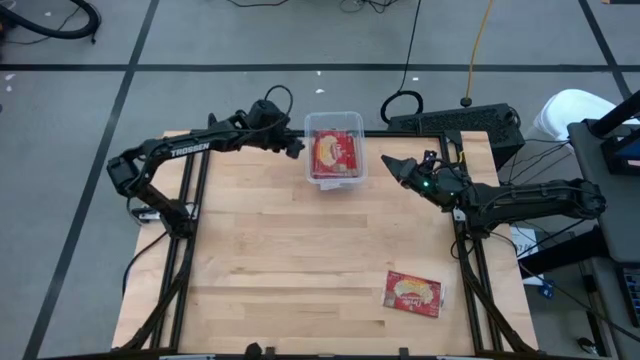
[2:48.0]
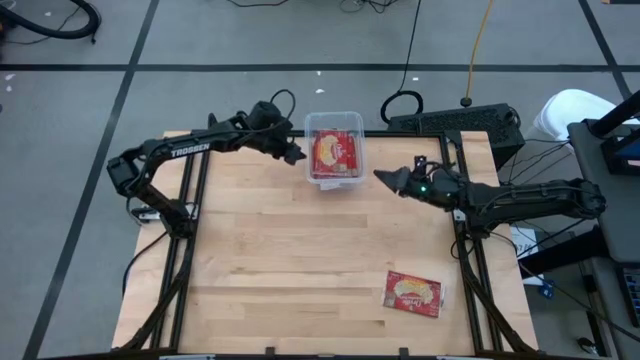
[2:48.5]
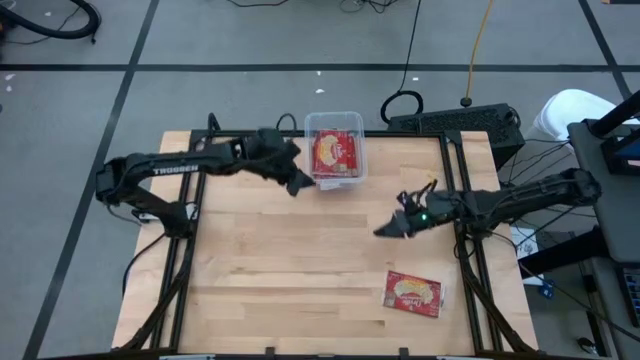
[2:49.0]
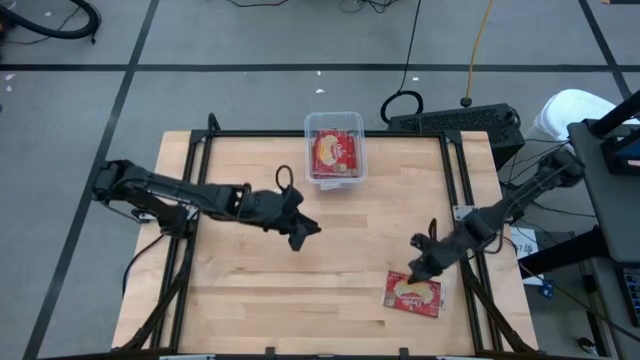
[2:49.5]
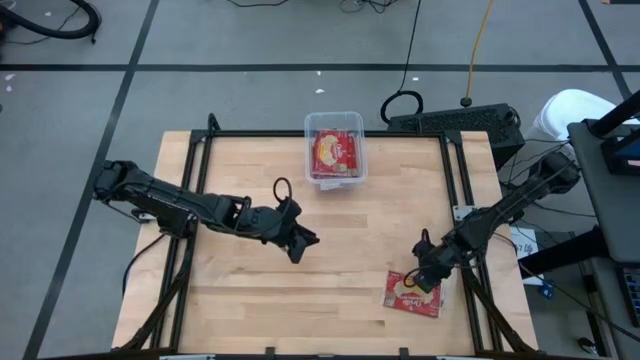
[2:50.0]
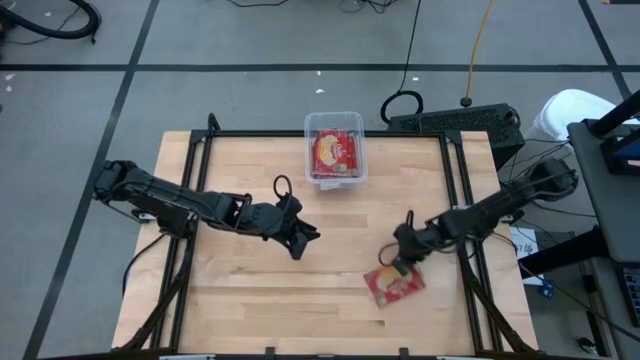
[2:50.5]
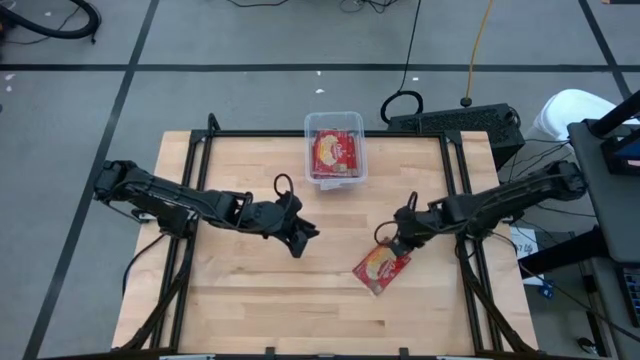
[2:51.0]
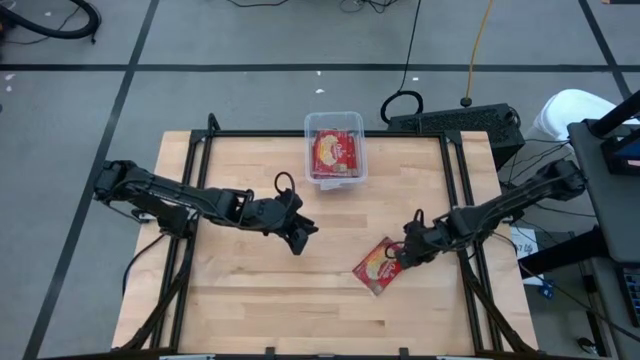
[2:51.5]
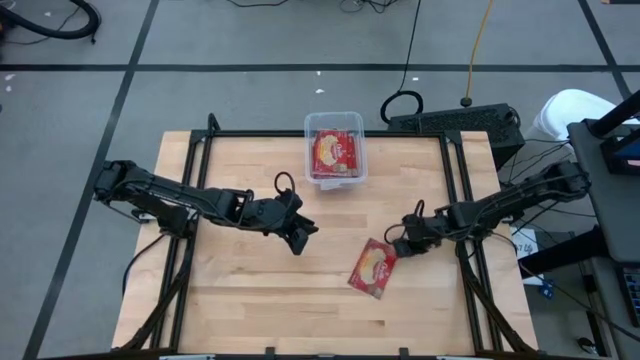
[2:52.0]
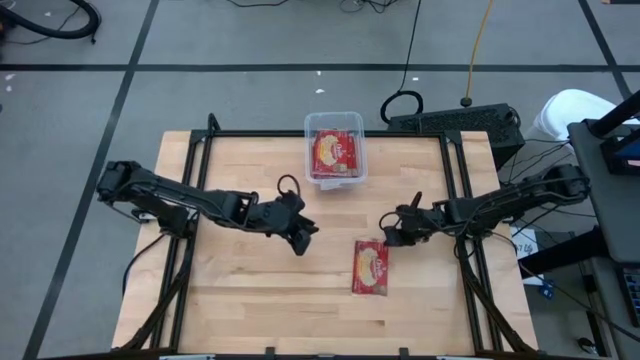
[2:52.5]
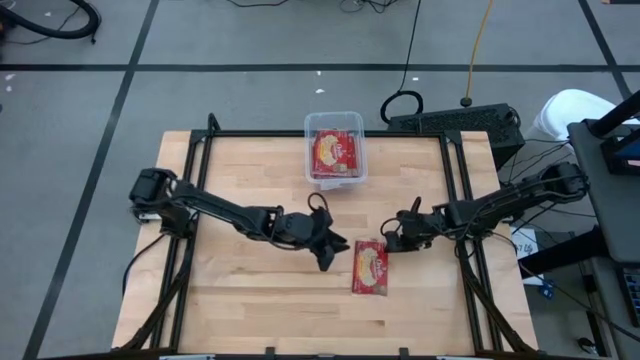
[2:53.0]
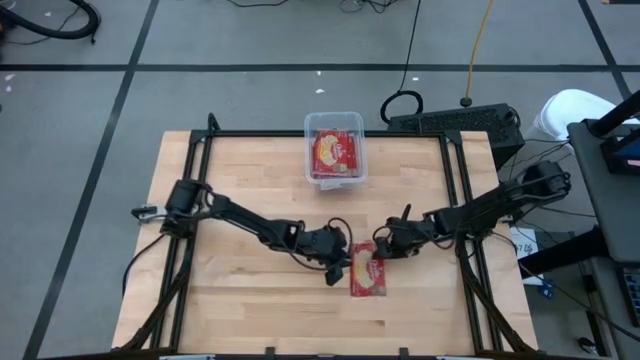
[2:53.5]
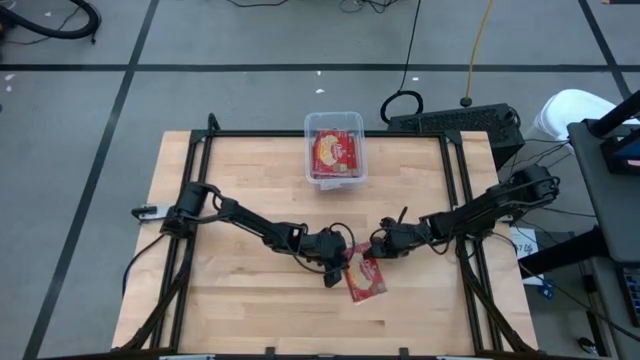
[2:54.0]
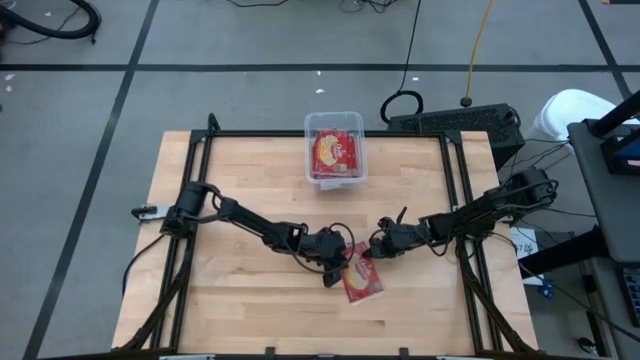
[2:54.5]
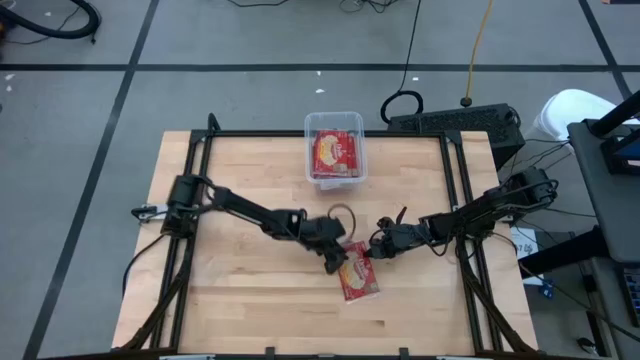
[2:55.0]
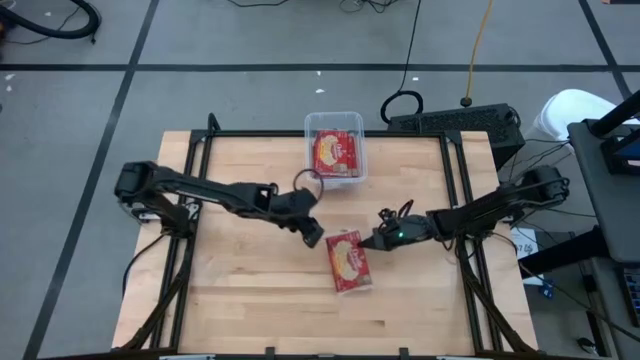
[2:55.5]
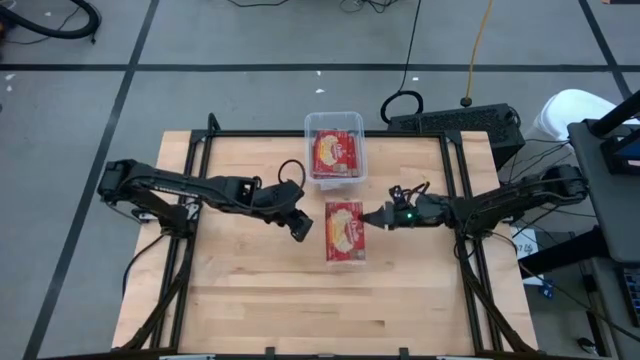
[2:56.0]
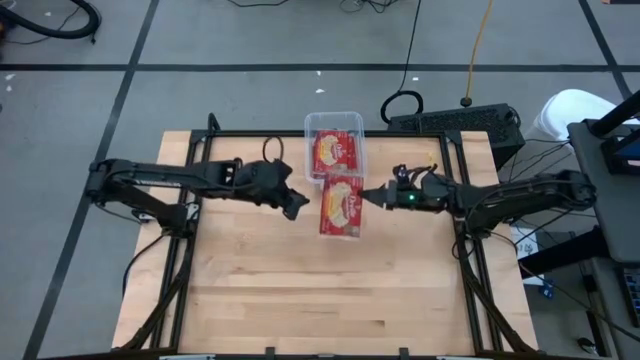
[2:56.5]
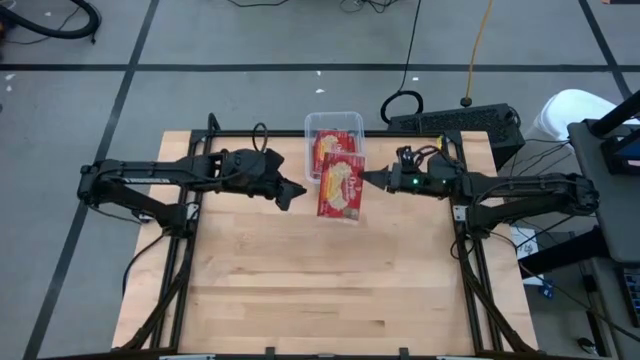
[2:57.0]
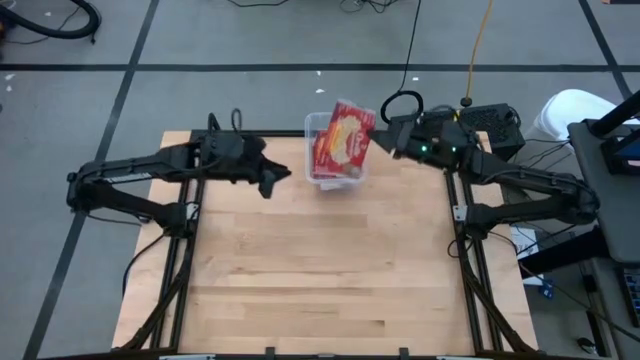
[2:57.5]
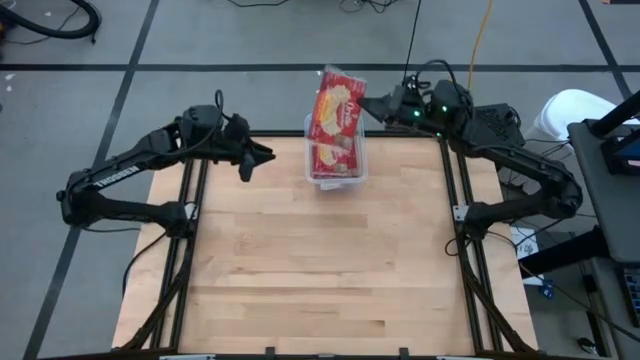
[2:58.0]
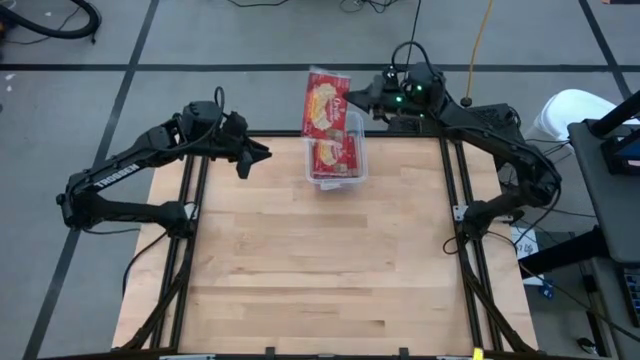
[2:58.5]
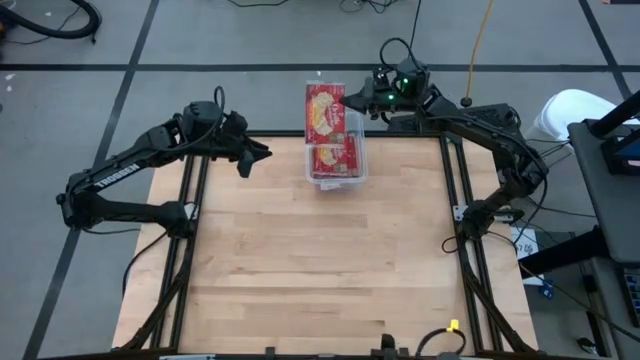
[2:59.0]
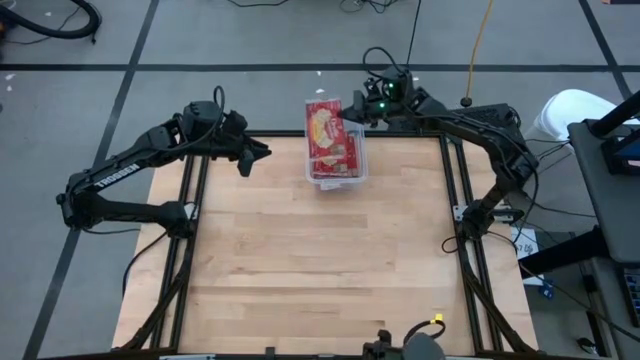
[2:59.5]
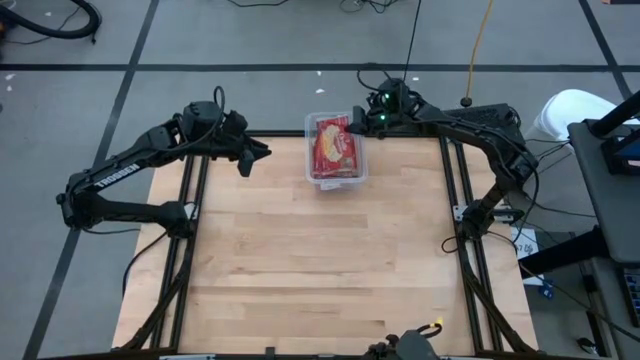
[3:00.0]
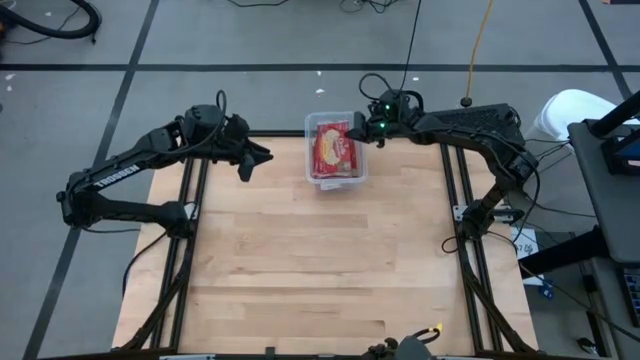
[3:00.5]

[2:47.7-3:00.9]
Task: Sort popcorn bags into baskets
Put the red popcorn bag into the transparent container

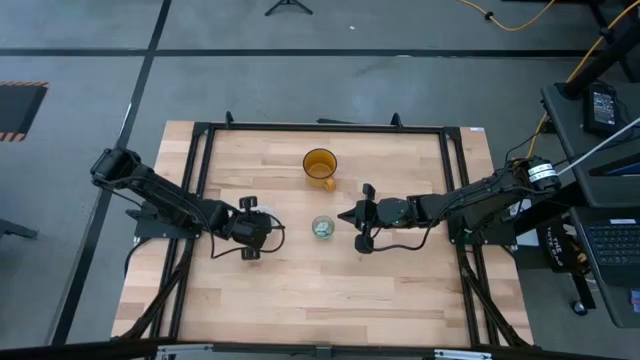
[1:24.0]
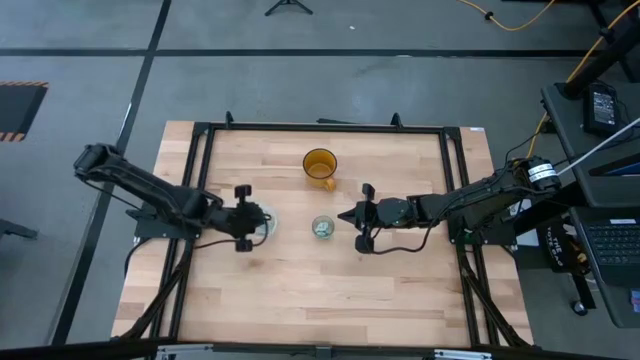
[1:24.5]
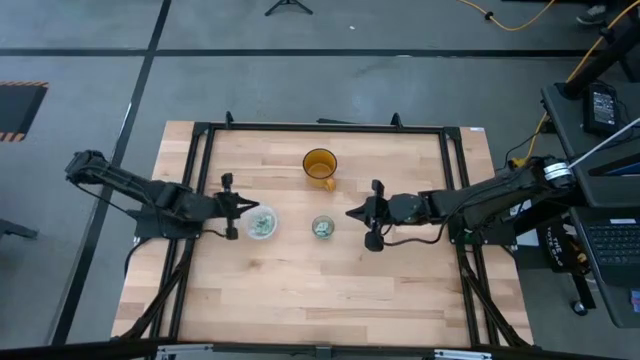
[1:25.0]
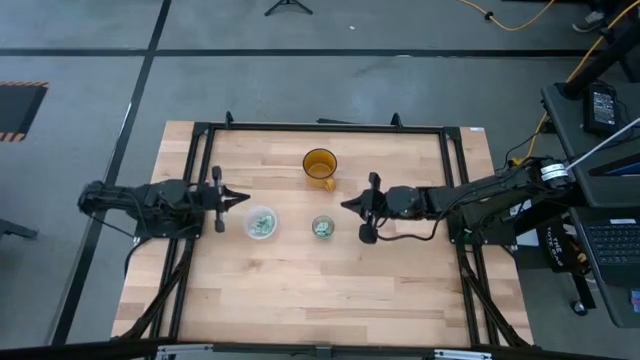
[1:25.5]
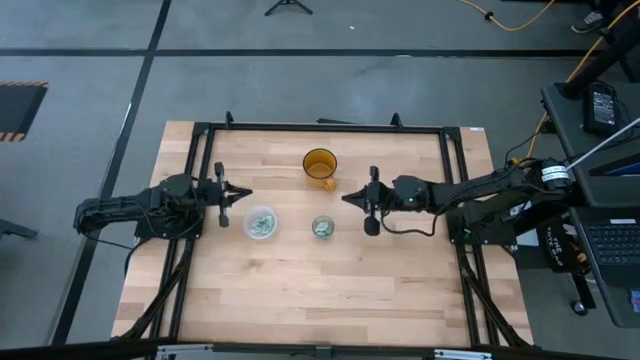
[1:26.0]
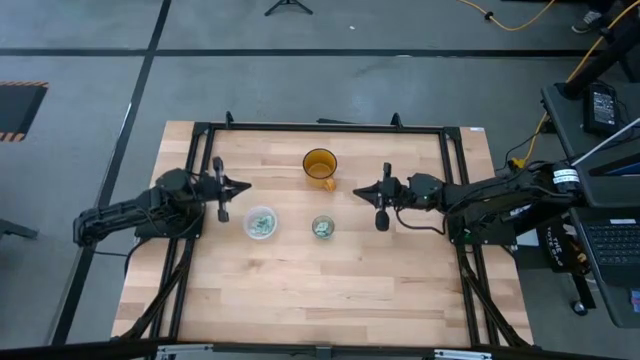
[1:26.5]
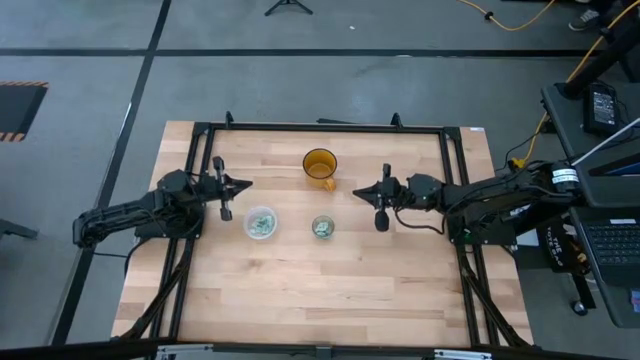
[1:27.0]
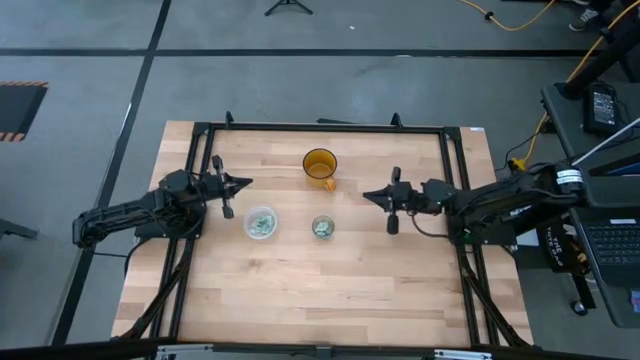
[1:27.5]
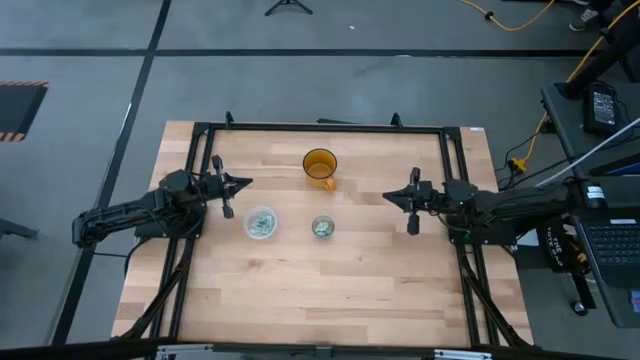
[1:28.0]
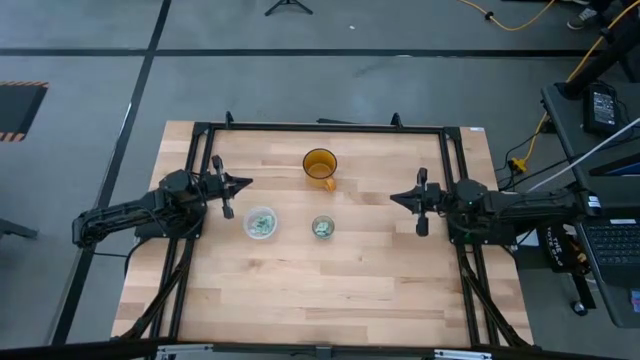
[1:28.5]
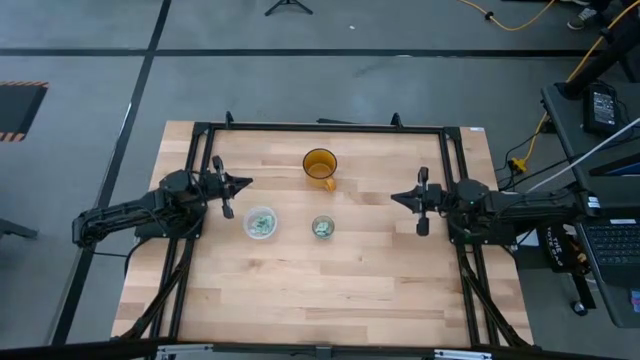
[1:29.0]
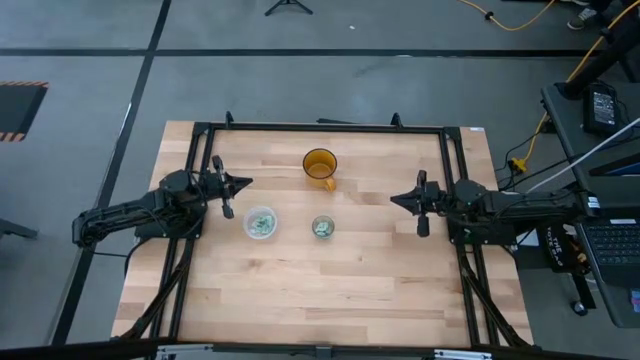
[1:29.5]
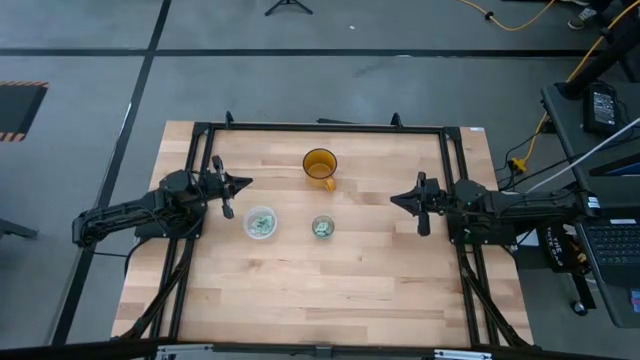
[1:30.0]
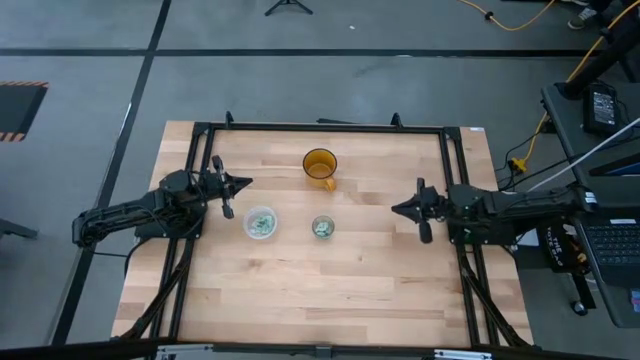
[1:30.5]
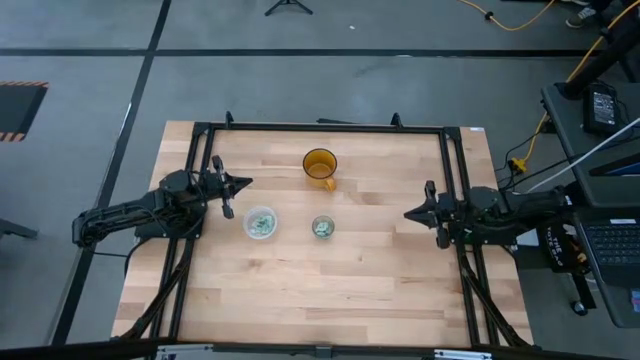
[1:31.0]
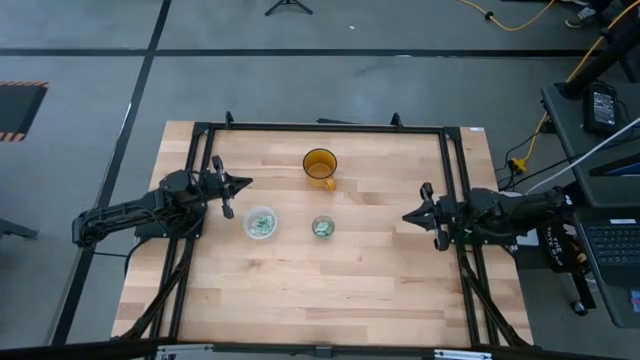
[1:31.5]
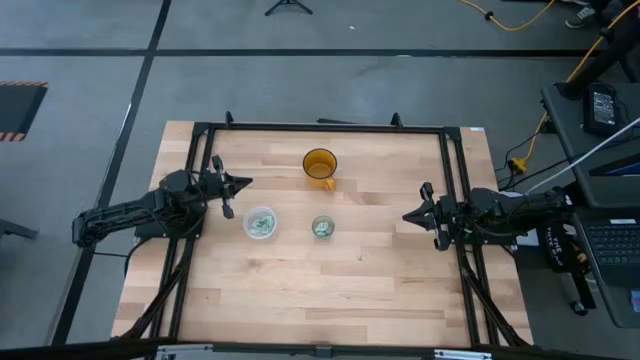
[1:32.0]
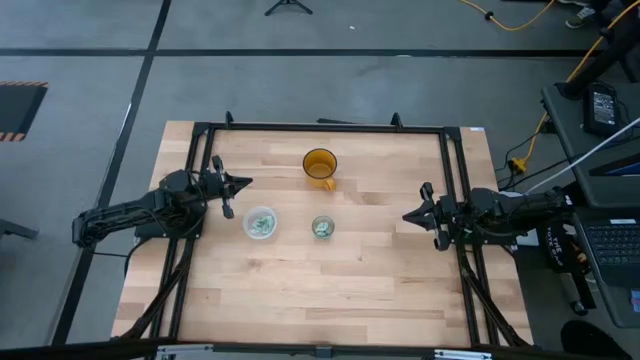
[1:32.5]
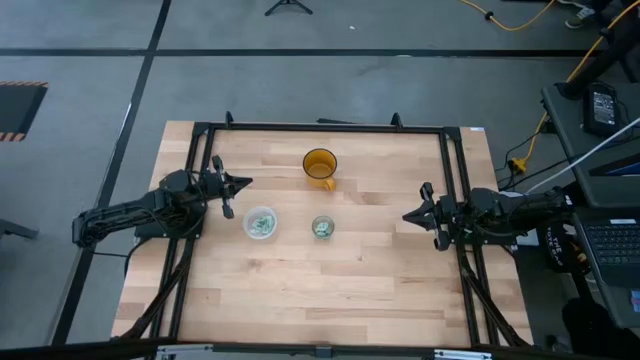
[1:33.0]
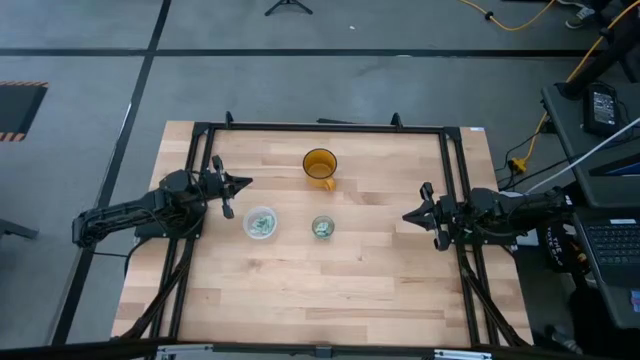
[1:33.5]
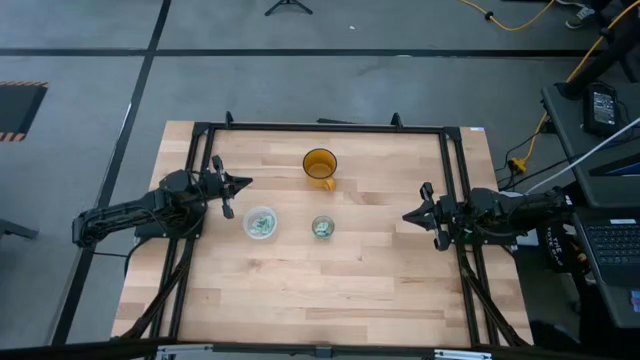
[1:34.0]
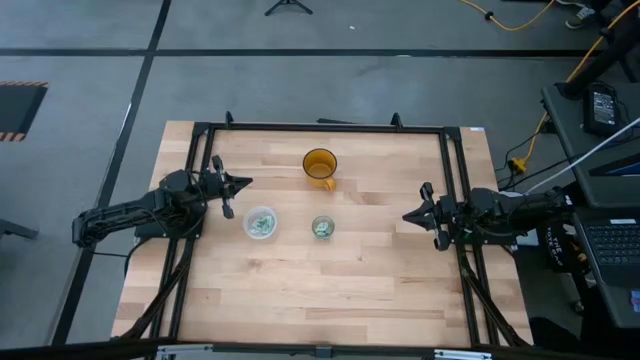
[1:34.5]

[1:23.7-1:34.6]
Task: Pick and place Stevia / Truvia into bins
Return to Home Position
